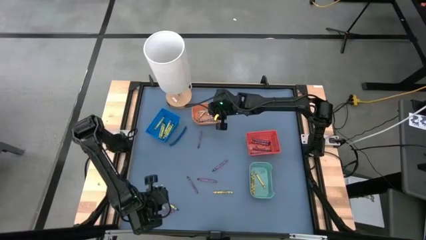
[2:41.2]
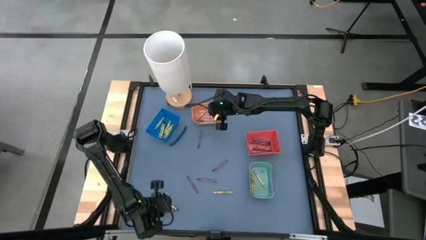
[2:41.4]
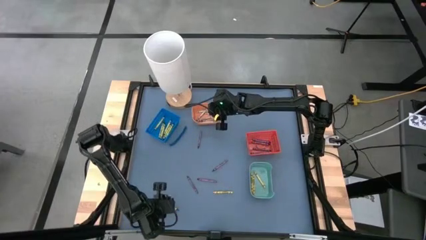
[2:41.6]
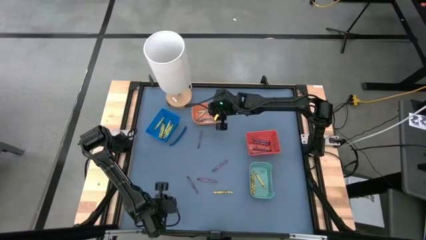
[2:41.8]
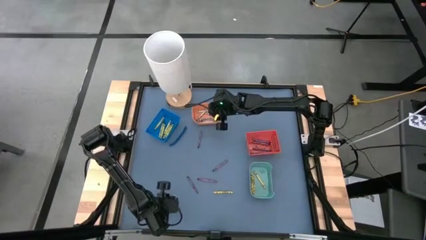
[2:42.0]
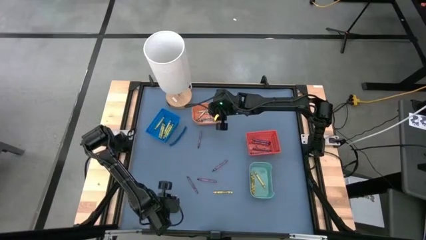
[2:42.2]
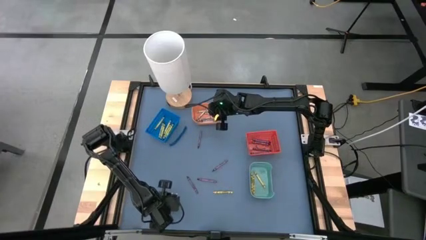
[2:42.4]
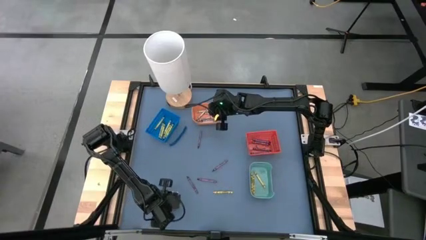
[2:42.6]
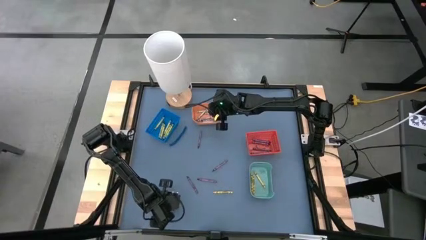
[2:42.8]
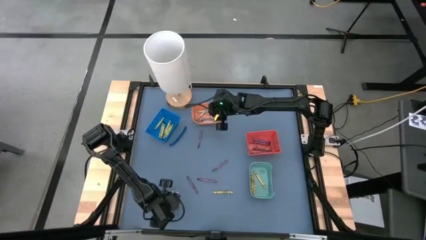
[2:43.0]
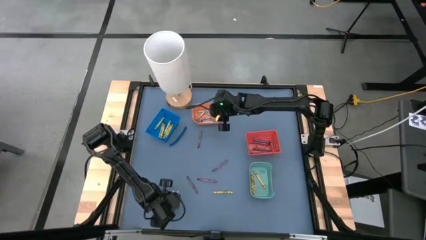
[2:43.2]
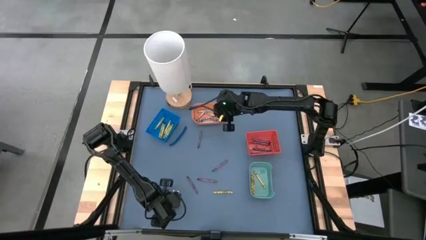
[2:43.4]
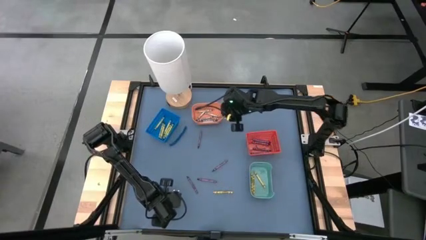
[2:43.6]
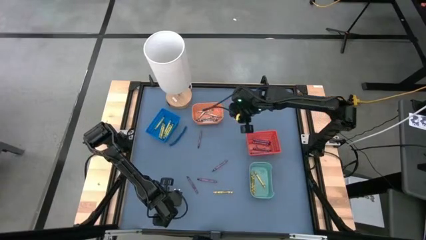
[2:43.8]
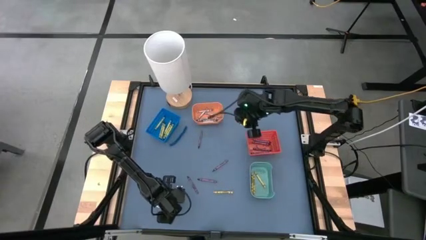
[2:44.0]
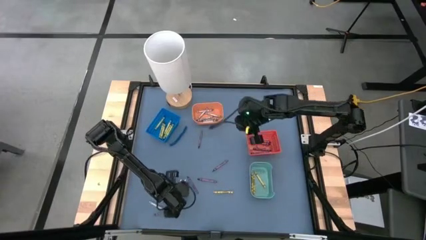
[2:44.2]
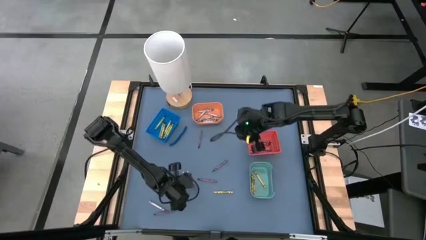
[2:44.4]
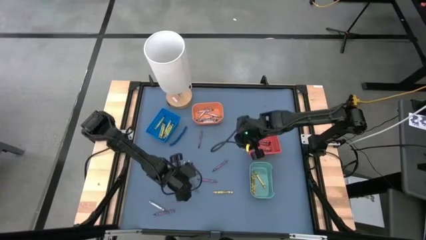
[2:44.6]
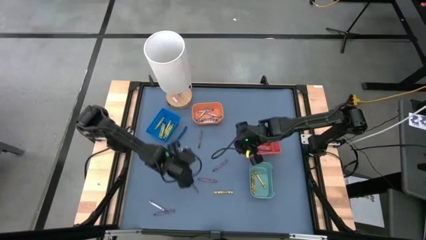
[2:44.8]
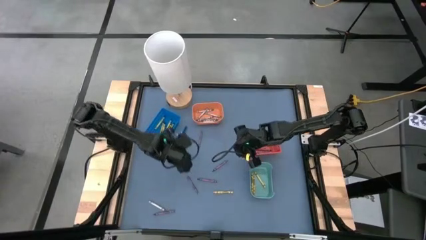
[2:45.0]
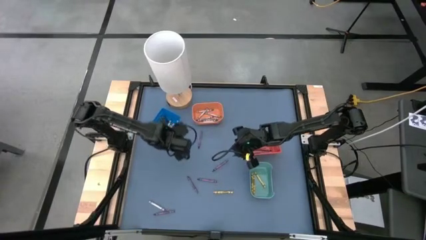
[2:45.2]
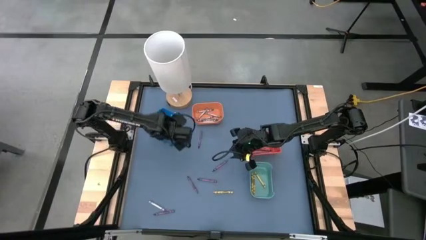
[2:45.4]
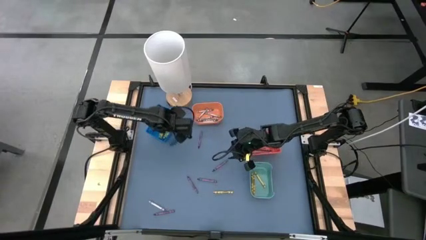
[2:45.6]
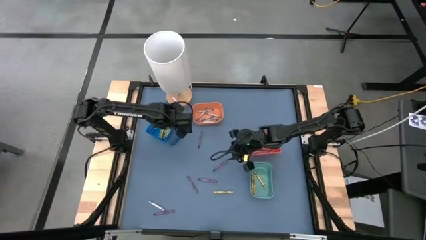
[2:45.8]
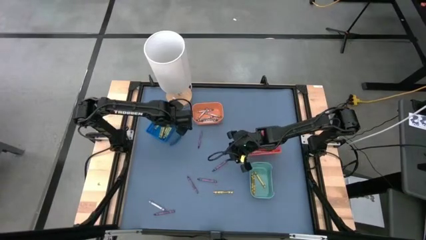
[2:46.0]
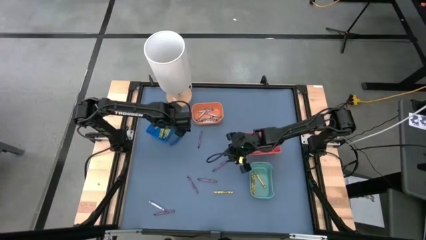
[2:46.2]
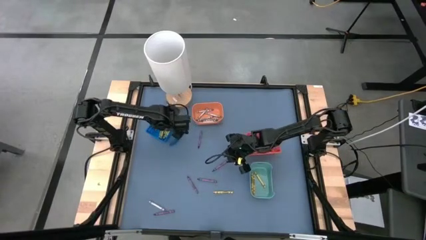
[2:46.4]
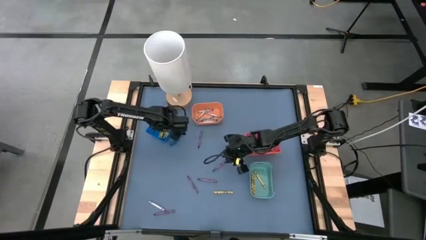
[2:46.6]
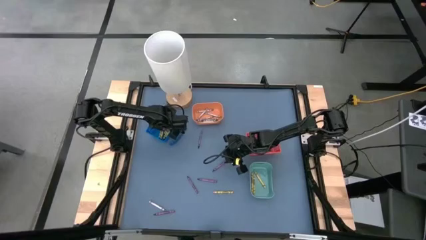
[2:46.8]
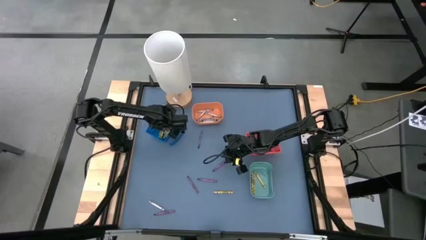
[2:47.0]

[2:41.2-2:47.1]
Task: Sort crayons
Put the green crayon into the dark blue bin

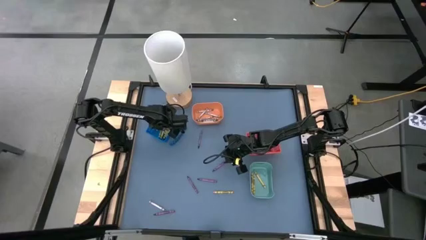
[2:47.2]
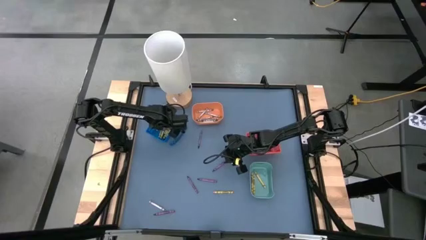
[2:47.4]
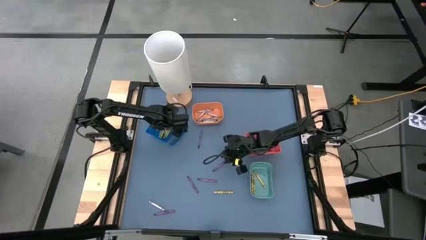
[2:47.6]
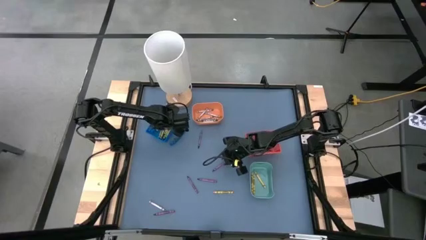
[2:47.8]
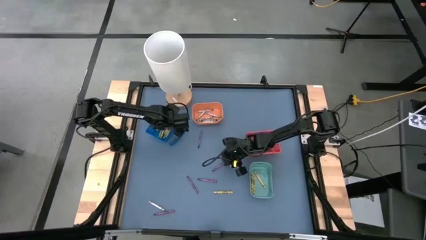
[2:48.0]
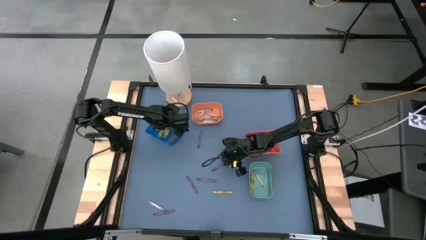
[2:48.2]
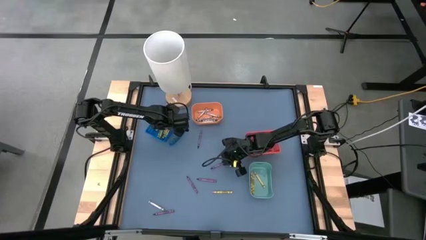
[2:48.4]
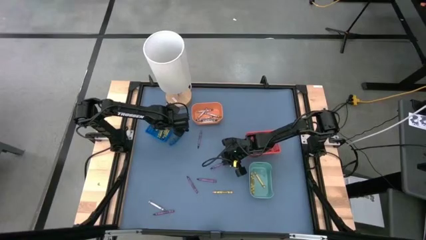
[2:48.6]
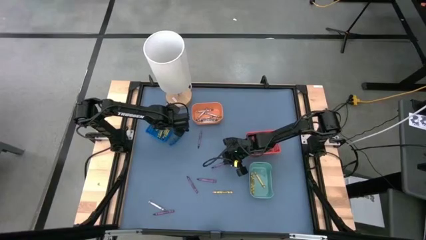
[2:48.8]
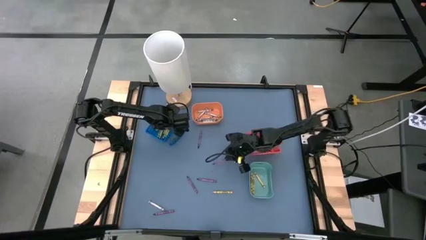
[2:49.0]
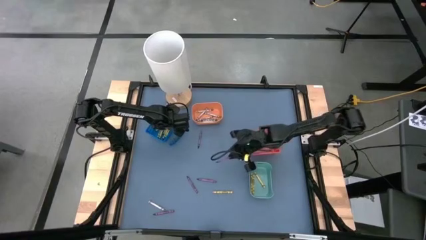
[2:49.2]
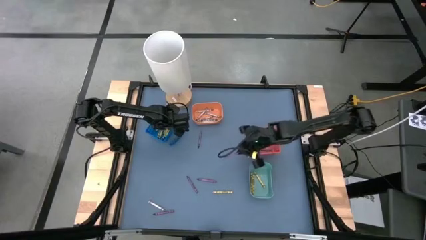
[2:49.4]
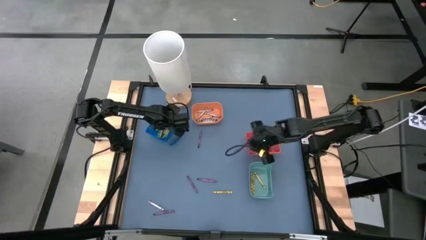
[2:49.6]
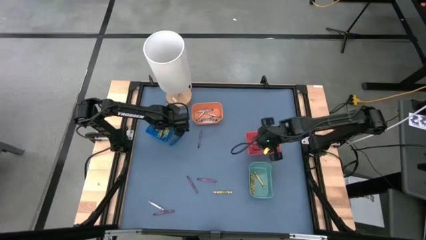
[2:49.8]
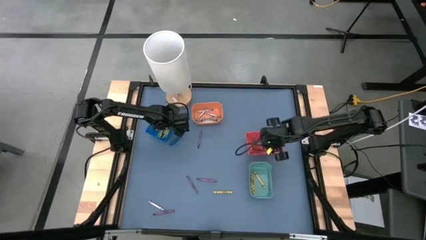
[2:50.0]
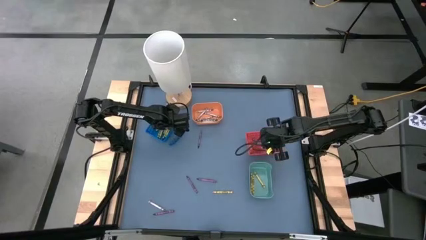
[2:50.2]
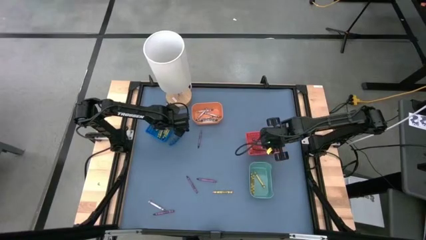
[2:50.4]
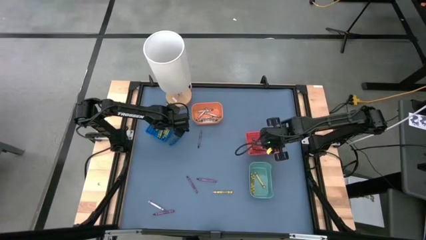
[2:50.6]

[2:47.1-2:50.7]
Put the violet crayon into the red bin

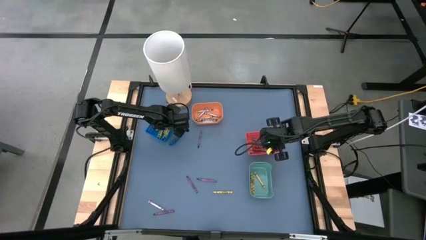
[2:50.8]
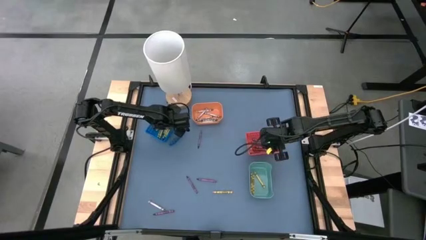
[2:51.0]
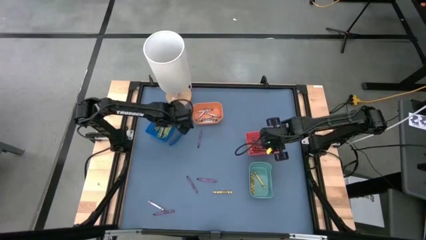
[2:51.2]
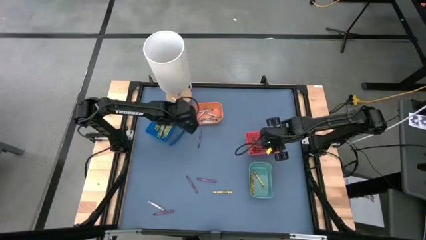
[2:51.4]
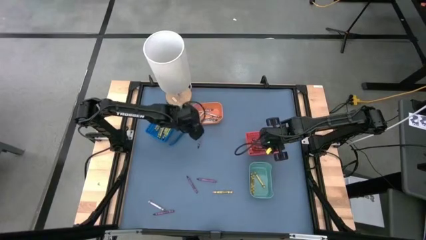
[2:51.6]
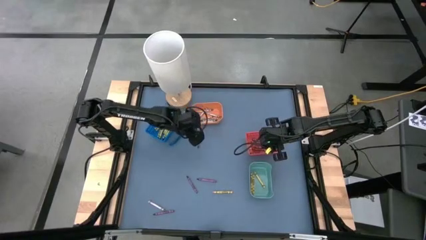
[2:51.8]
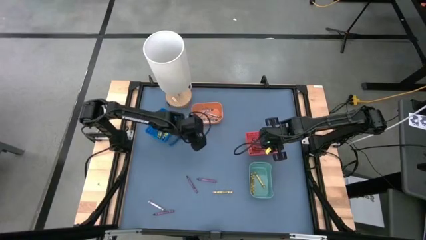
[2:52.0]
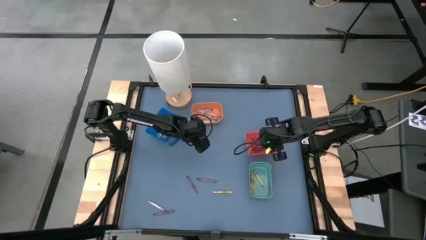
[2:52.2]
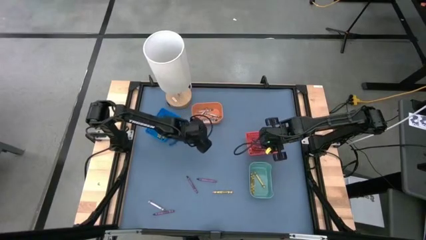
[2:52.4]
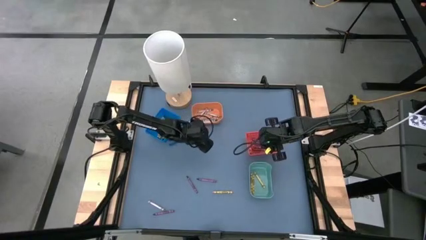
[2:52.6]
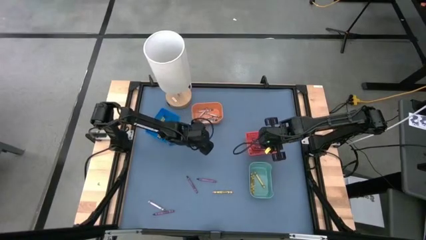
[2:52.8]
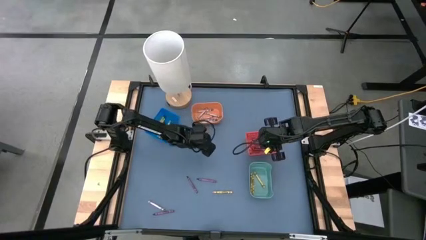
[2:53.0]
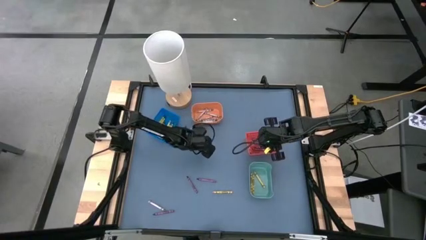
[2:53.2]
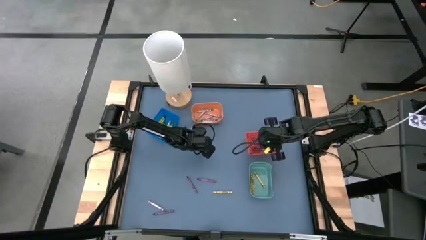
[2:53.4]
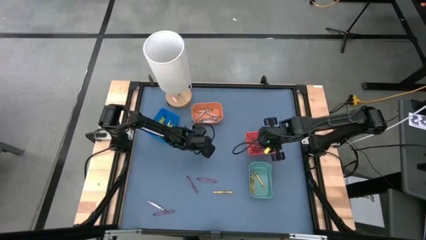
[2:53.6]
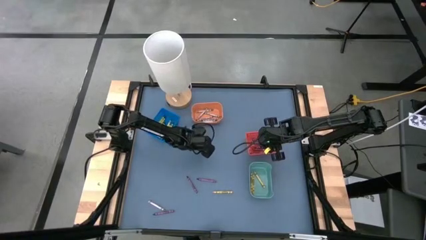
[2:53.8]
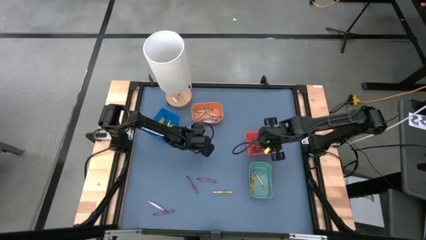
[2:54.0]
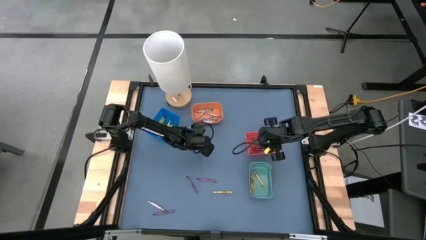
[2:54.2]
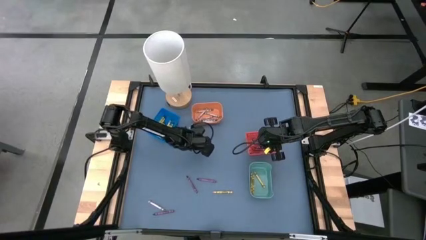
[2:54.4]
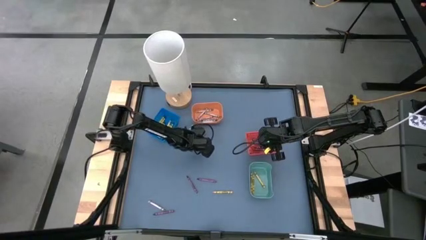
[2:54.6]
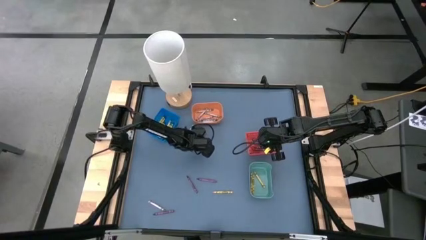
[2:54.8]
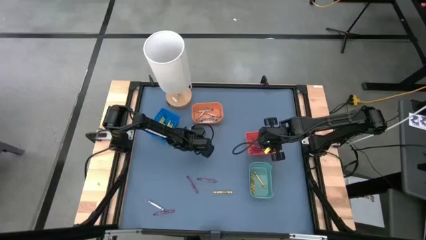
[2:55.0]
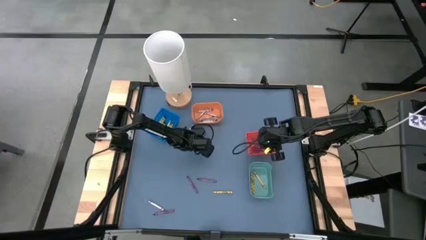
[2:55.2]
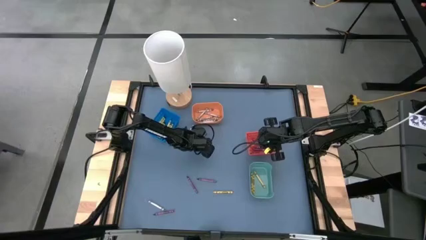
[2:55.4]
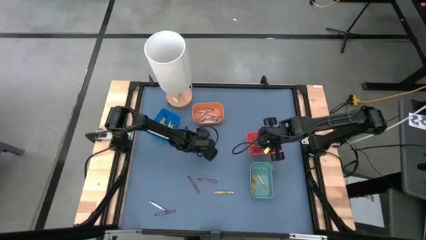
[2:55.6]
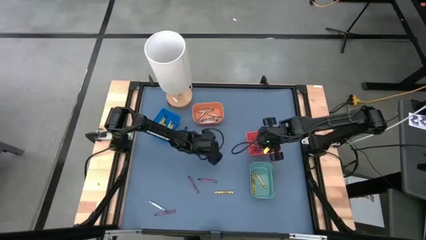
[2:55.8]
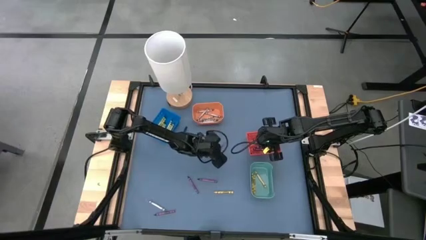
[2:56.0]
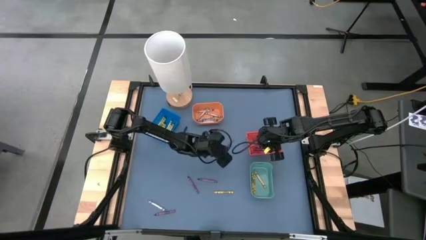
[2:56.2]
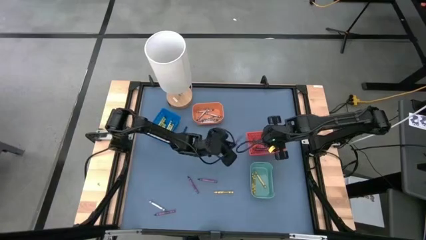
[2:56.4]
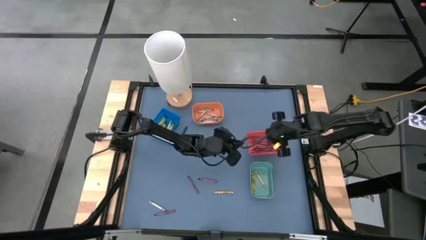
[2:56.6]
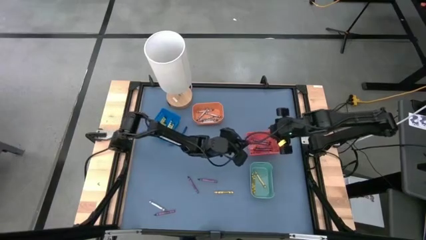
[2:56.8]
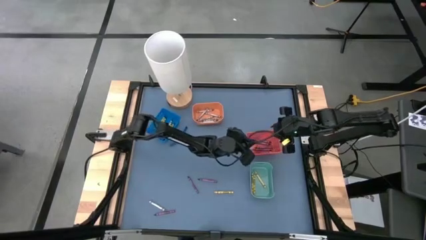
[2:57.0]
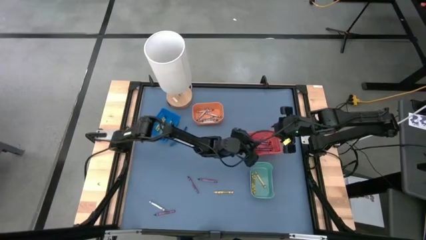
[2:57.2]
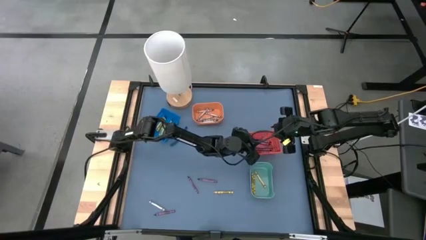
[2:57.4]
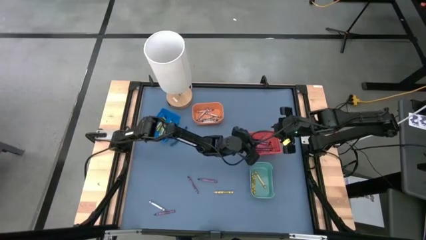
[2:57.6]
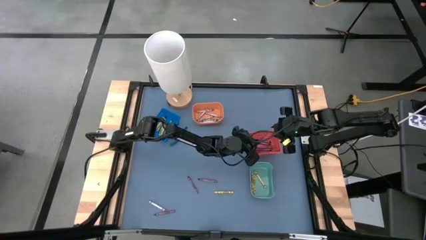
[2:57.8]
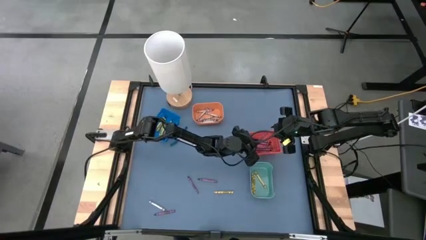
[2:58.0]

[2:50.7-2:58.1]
Put the violet crayon into the red bin
